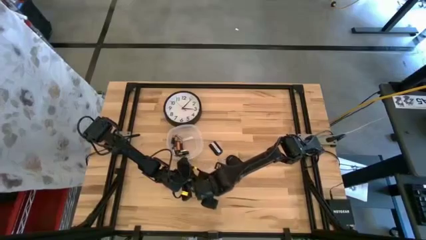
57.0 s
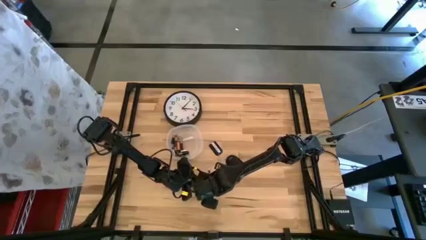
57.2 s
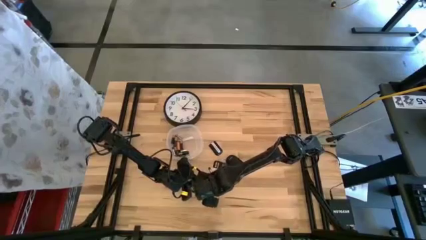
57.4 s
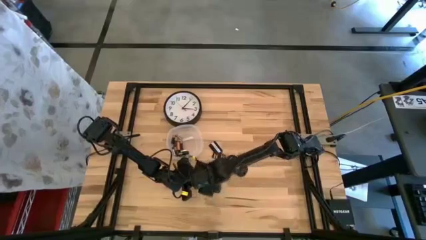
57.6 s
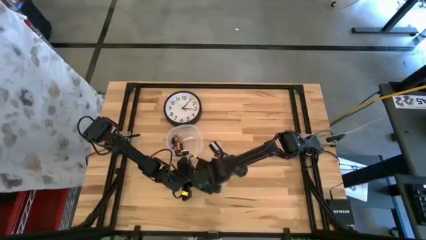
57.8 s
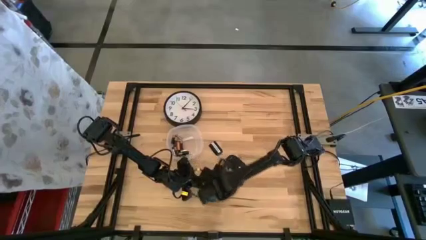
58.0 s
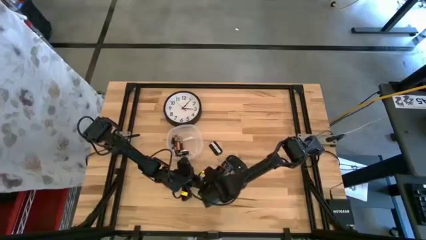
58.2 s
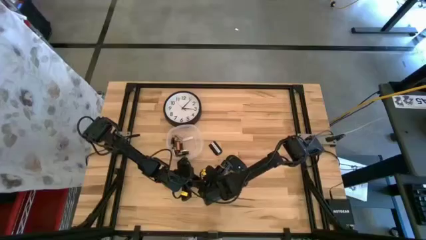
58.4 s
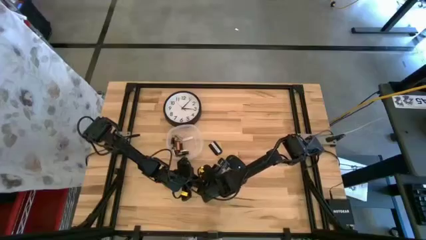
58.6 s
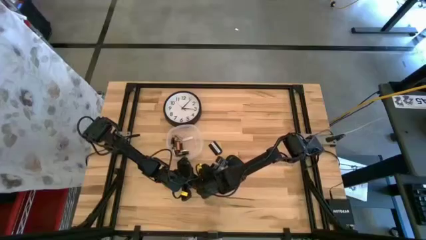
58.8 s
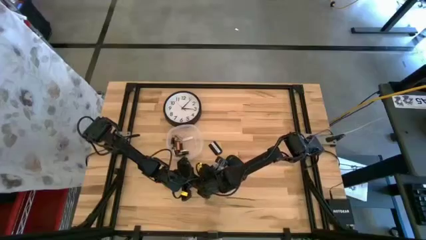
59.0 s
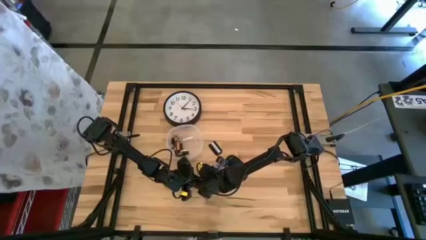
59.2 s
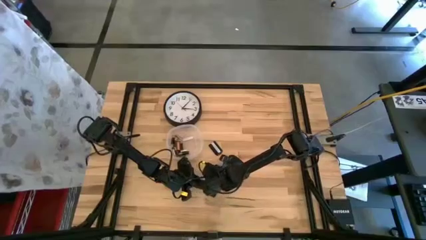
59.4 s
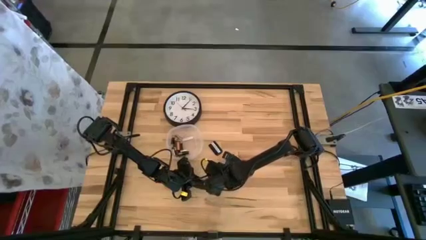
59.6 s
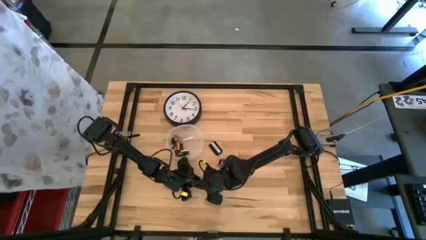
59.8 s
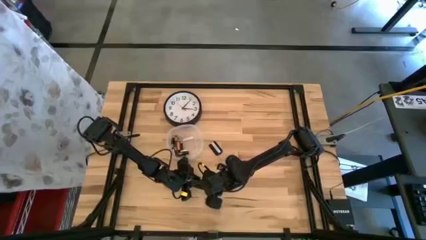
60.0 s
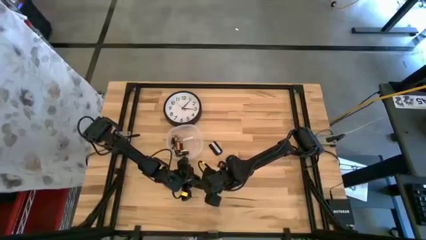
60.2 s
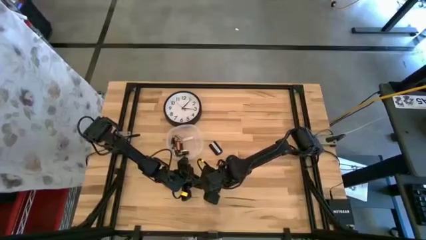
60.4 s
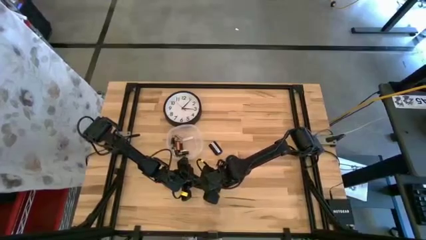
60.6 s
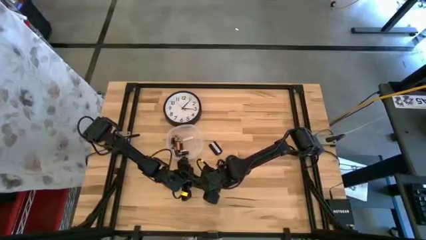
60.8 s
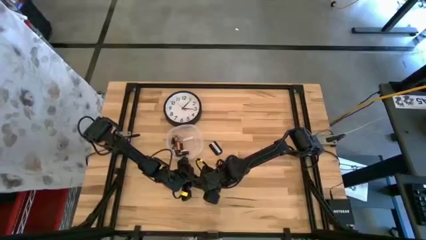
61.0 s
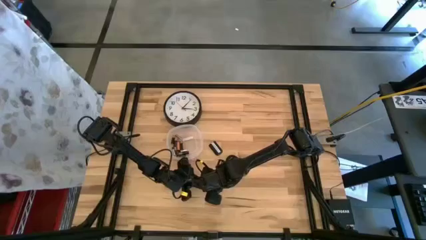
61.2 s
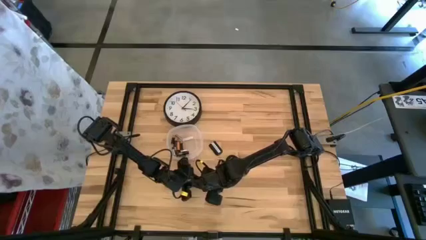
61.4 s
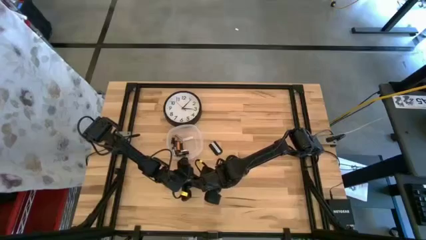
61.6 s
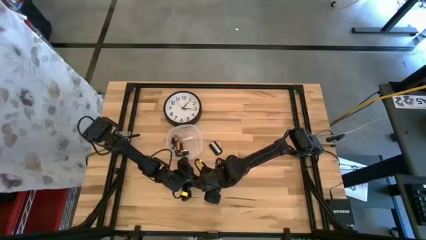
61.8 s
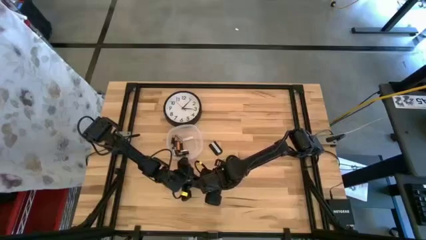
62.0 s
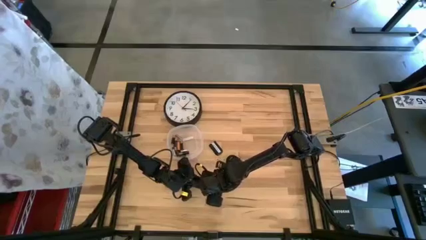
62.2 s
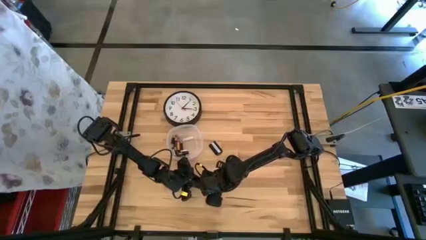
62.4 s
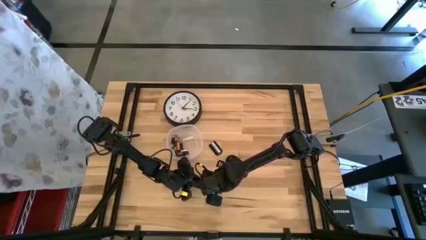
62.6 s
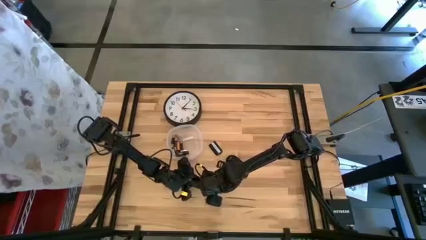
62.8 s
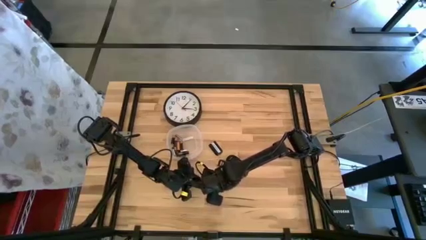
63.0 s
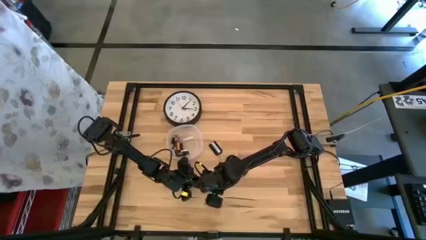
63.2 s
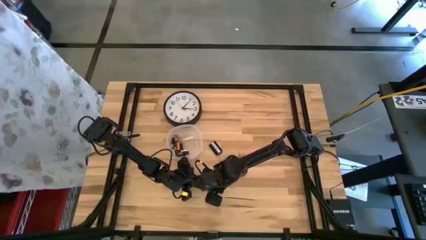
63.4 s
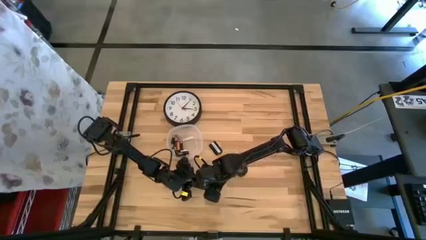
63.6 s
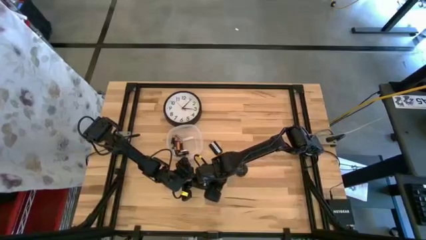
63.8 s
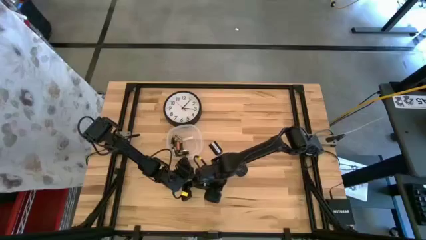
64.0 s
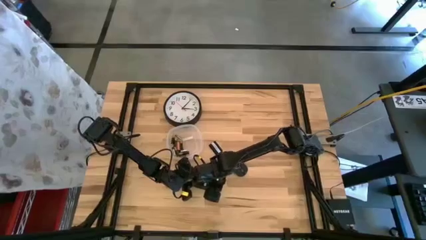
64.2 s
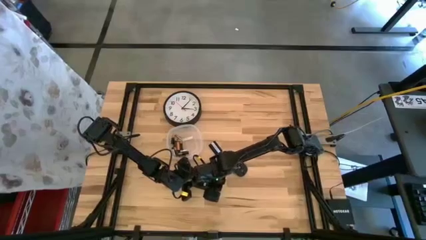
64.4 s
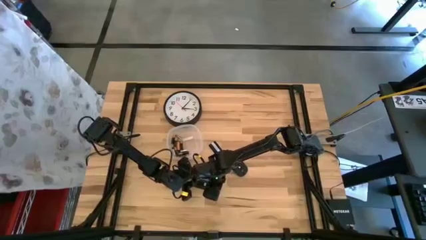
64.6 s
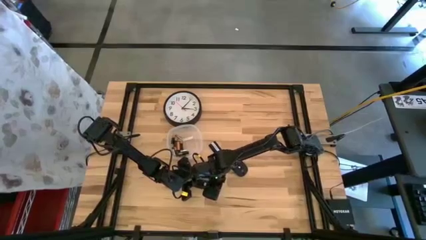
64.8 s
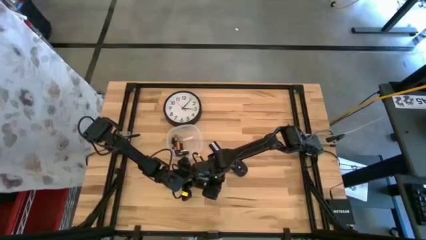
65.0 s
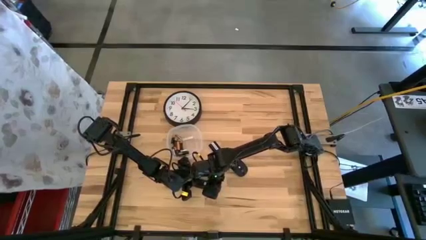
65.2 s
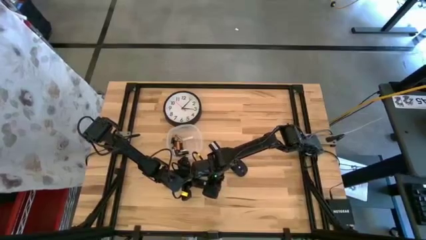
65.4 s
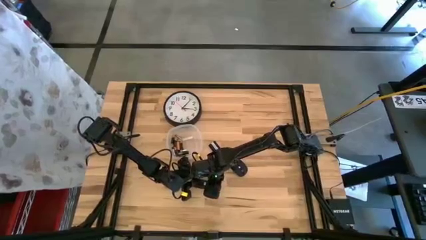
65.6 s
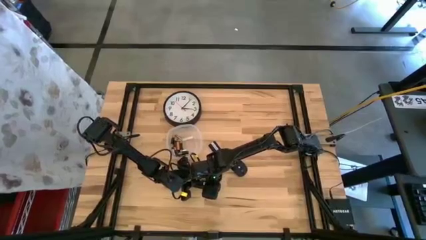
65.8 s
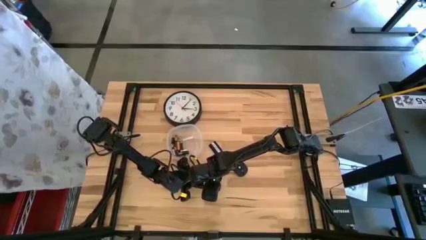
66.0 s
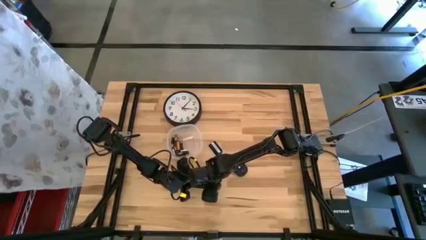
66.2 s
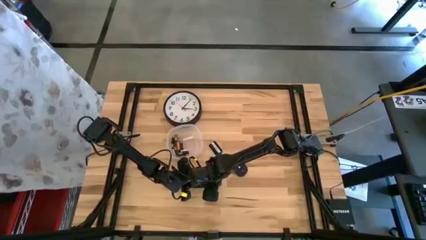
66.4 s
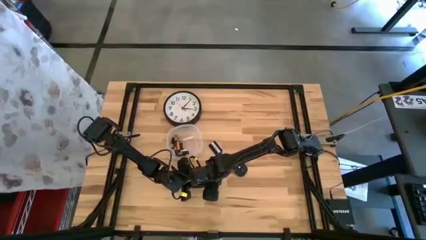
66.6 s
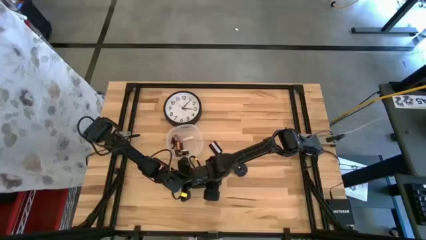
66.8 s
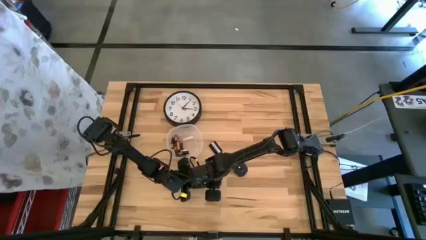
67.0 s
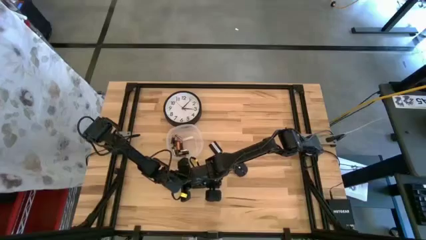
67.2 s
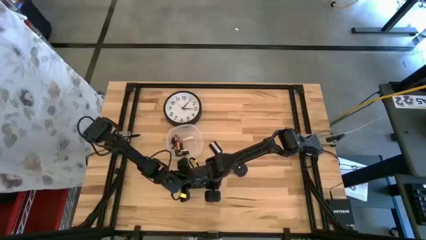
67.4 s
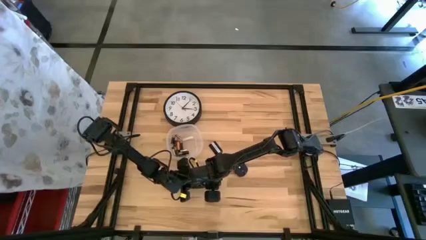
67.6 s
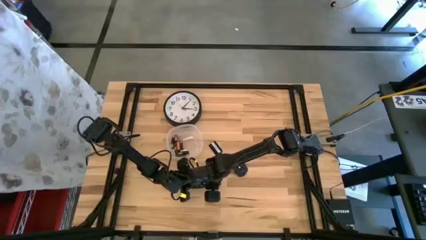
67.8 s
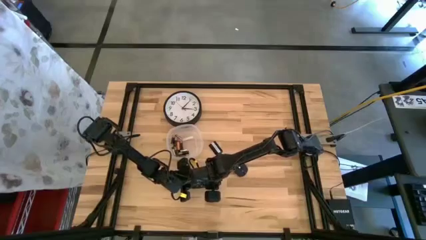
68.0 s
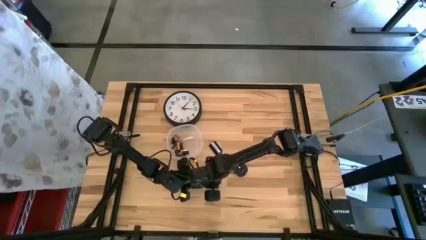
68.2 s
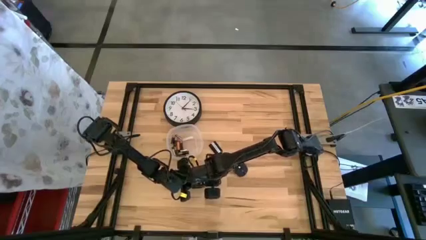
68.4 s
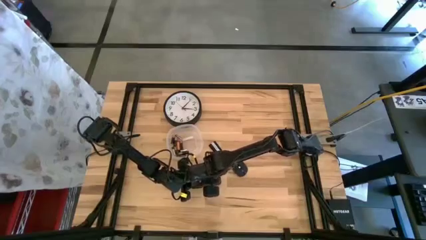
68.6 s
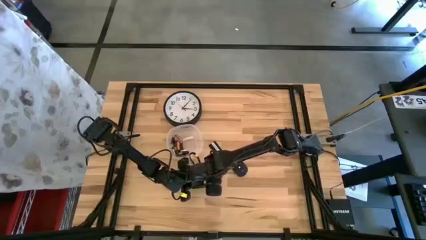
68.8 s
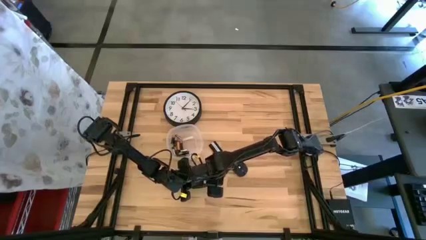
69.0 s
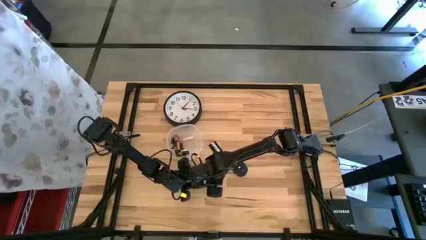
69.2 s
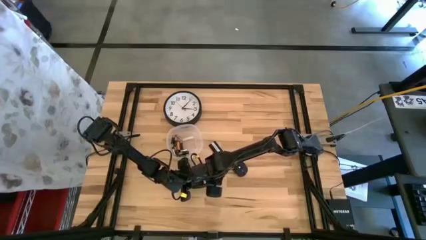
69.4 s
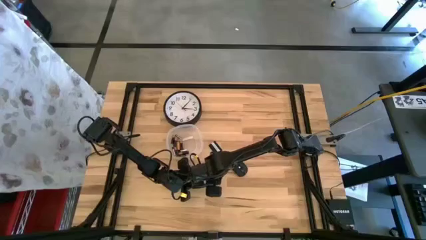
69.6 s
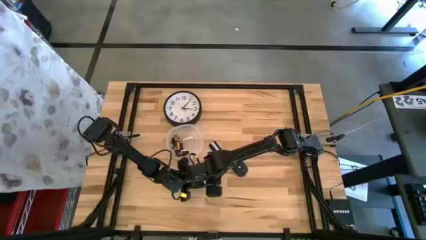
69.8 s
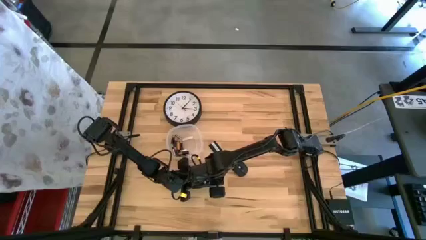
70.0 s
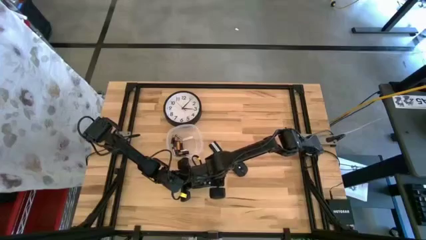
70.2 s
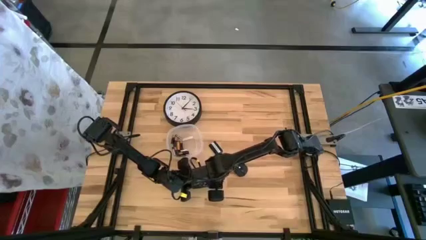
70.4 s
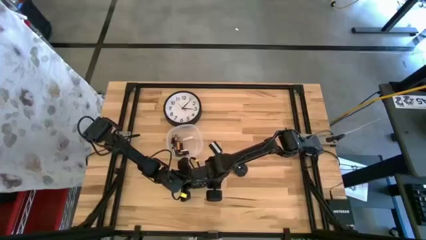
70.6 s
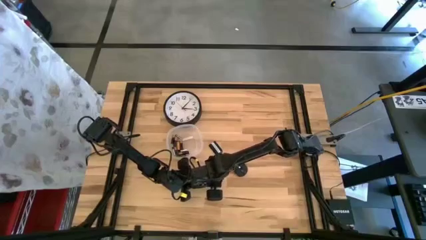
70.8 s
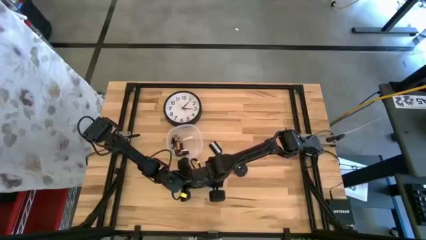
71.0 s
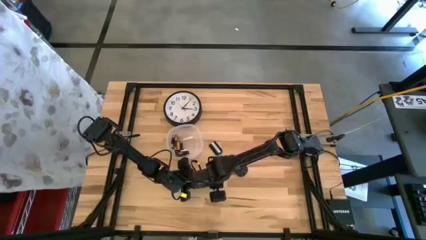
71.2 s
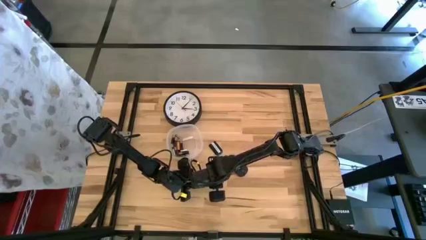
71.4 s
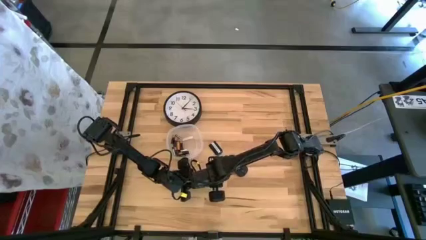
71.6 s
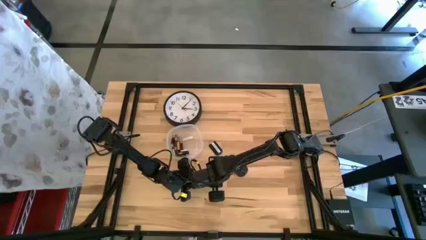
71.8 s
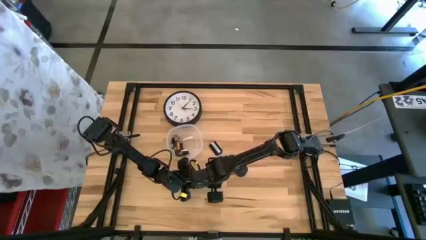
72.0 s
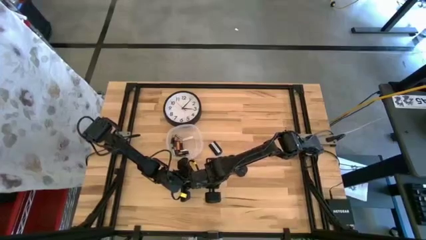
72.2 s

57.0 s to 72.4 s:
Task: Insert battery
Insert the silver battery into the remote control
